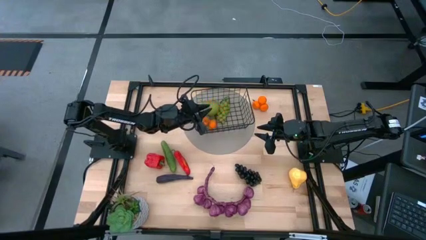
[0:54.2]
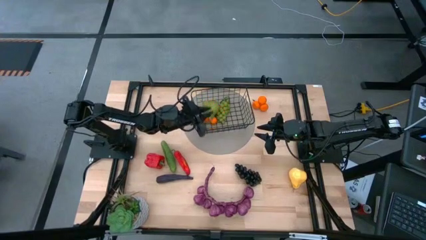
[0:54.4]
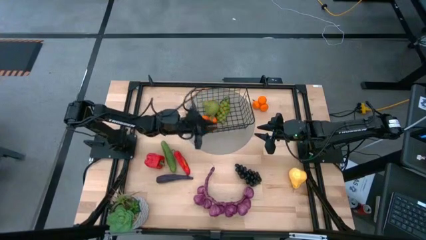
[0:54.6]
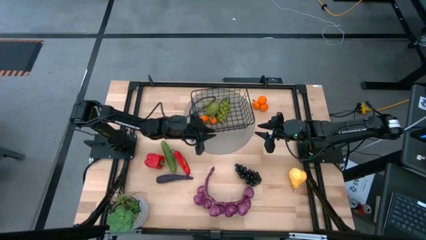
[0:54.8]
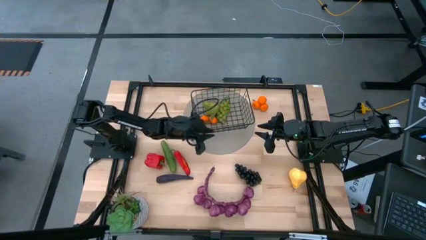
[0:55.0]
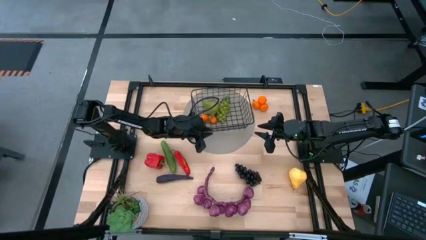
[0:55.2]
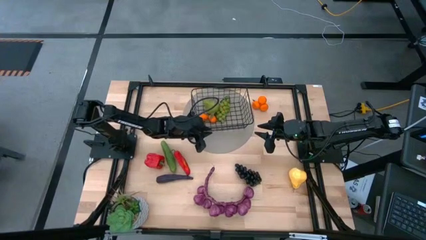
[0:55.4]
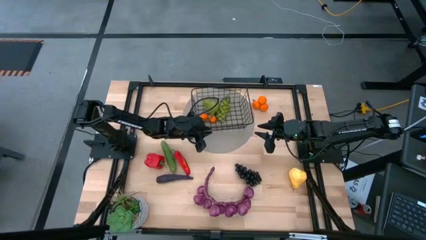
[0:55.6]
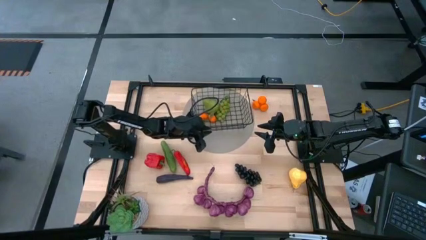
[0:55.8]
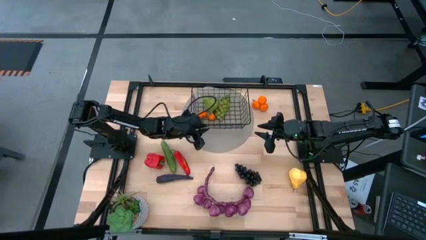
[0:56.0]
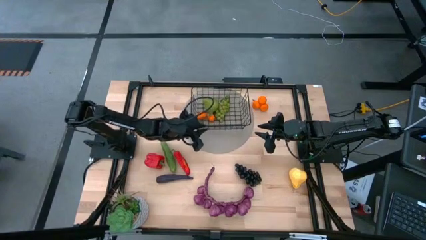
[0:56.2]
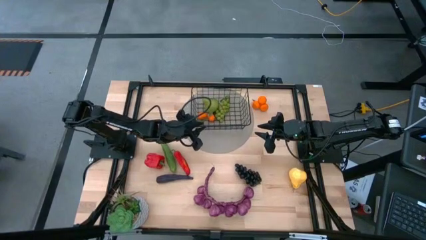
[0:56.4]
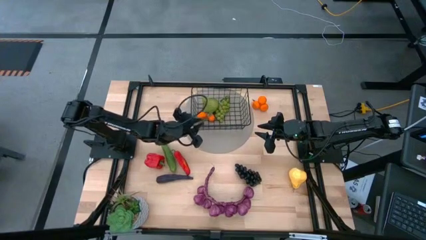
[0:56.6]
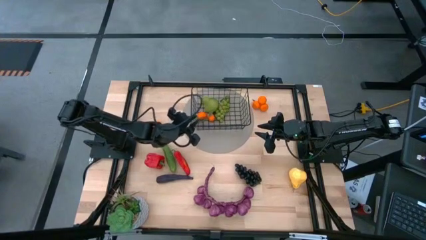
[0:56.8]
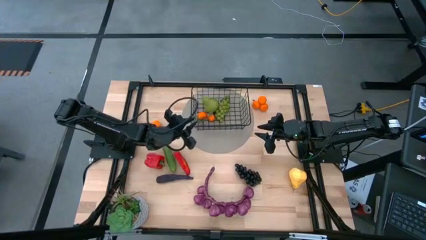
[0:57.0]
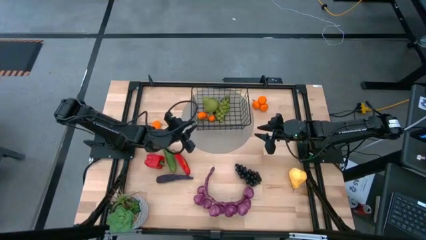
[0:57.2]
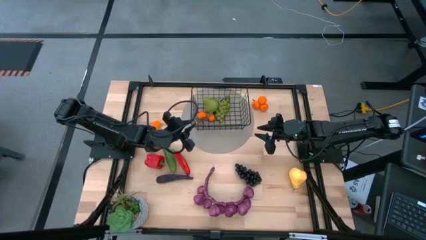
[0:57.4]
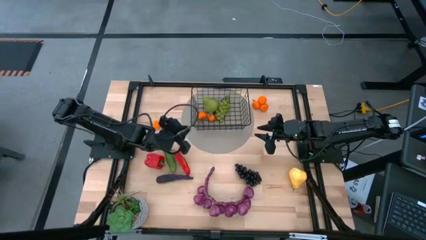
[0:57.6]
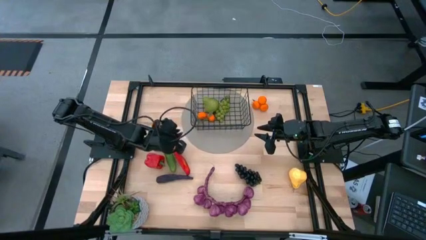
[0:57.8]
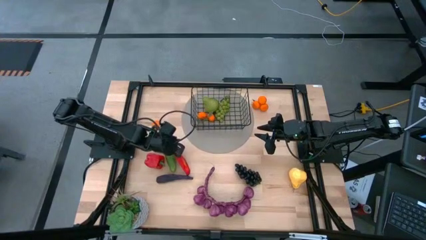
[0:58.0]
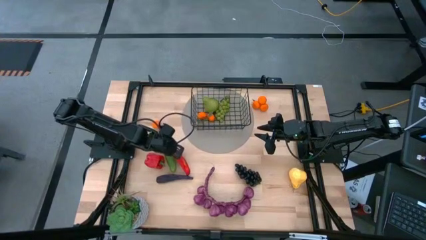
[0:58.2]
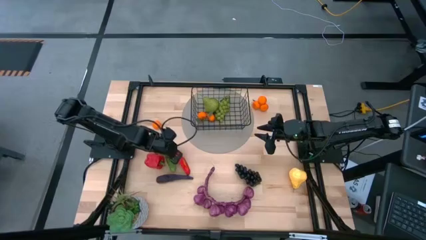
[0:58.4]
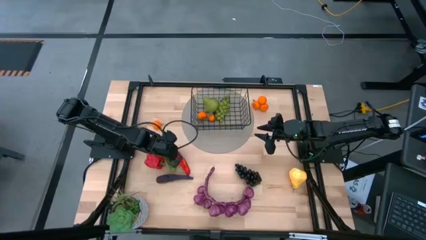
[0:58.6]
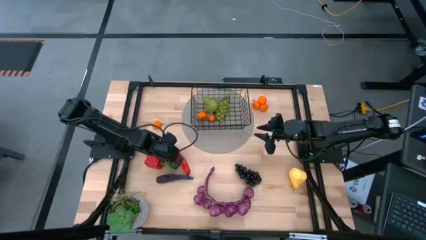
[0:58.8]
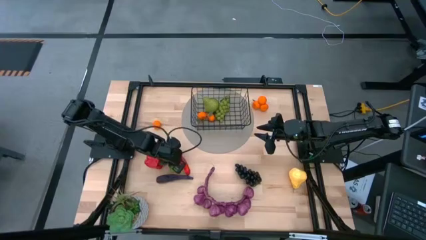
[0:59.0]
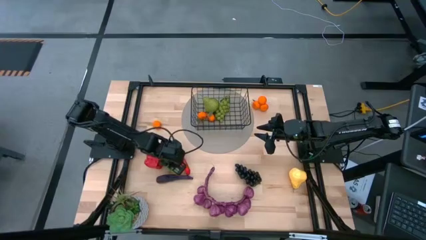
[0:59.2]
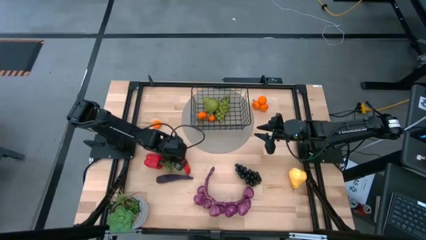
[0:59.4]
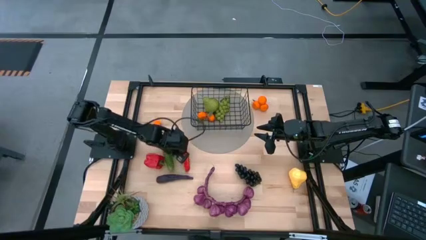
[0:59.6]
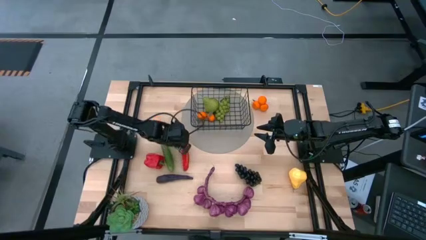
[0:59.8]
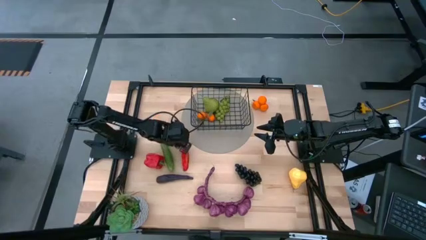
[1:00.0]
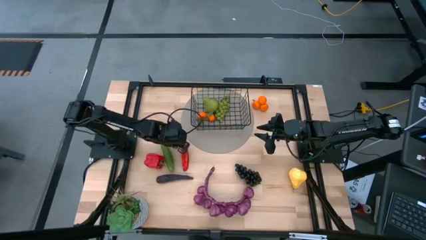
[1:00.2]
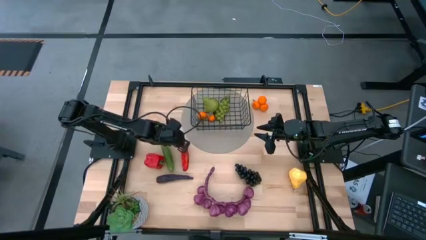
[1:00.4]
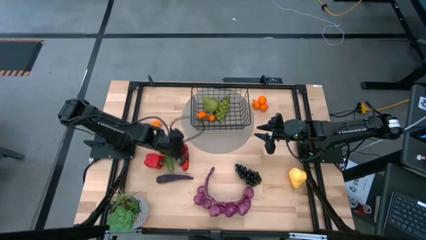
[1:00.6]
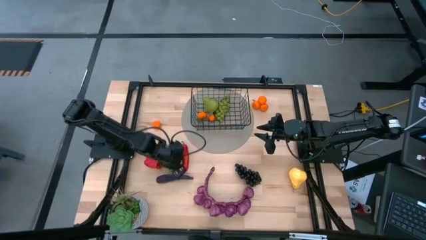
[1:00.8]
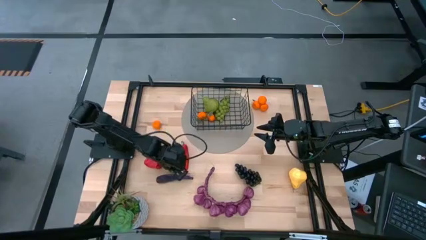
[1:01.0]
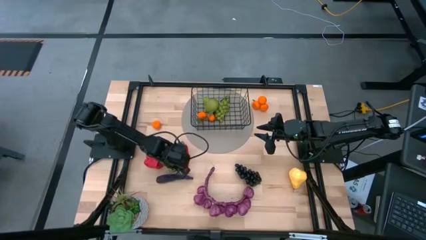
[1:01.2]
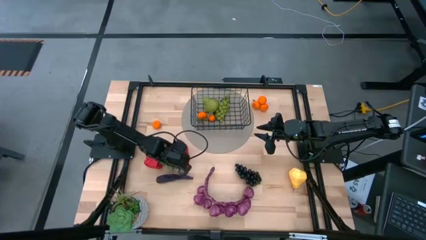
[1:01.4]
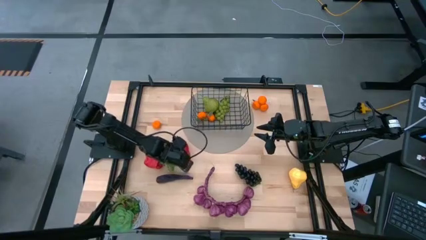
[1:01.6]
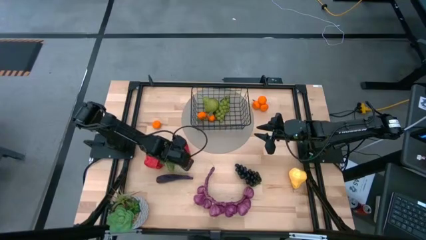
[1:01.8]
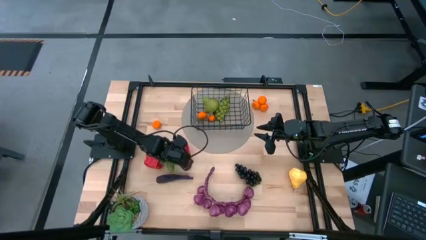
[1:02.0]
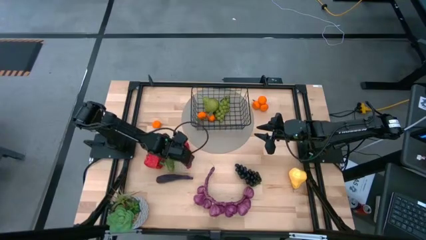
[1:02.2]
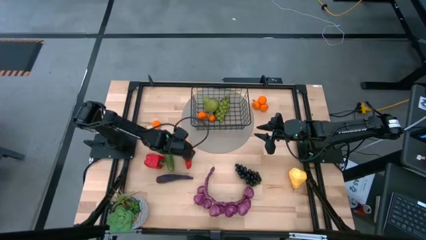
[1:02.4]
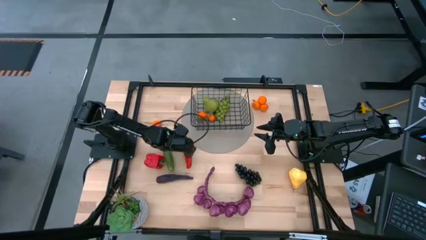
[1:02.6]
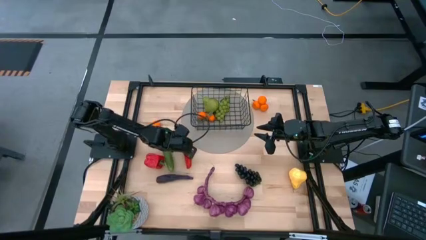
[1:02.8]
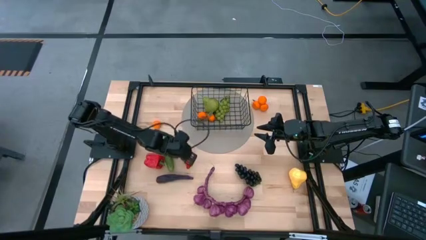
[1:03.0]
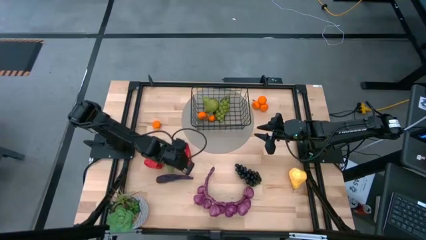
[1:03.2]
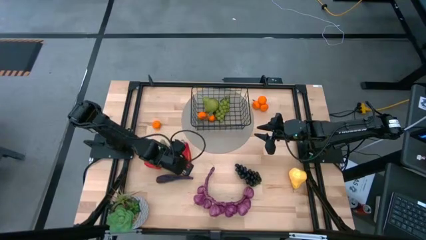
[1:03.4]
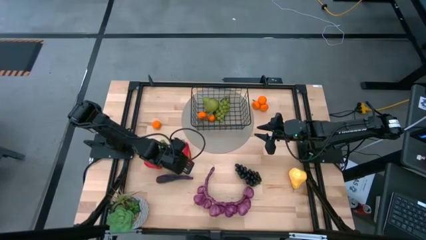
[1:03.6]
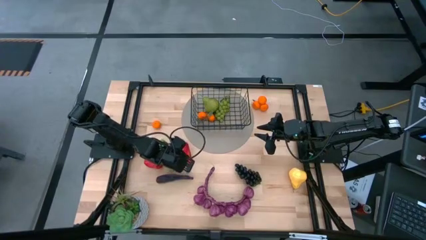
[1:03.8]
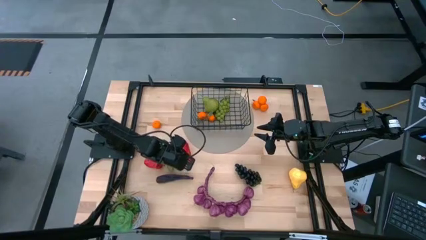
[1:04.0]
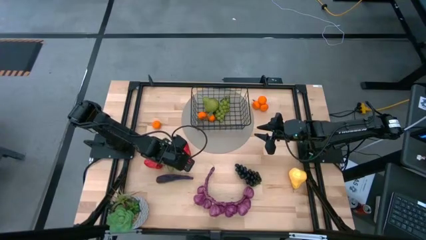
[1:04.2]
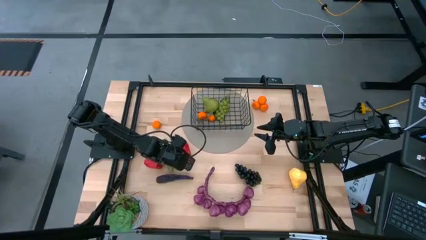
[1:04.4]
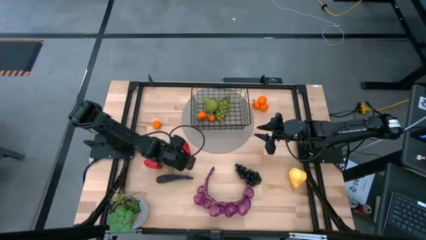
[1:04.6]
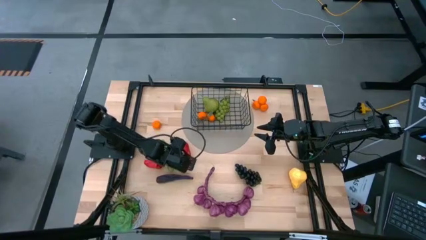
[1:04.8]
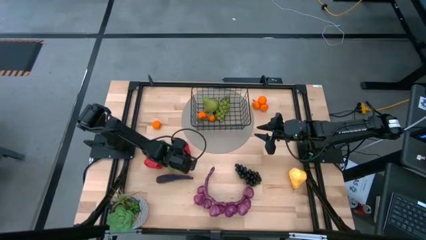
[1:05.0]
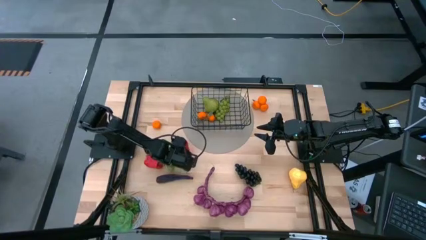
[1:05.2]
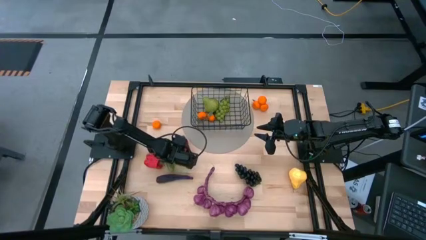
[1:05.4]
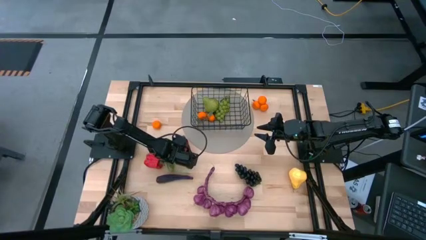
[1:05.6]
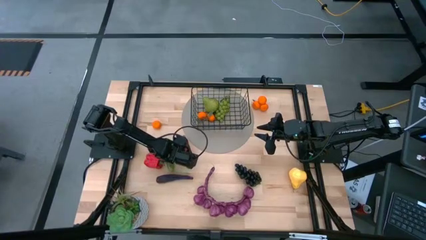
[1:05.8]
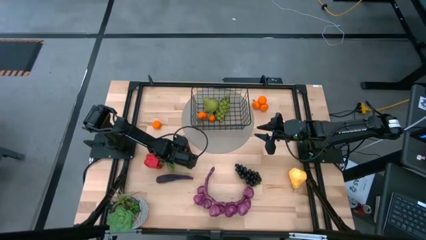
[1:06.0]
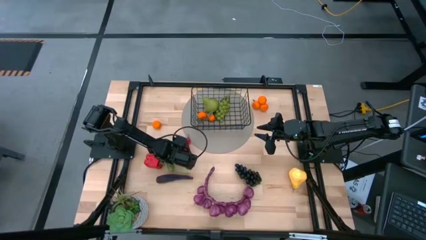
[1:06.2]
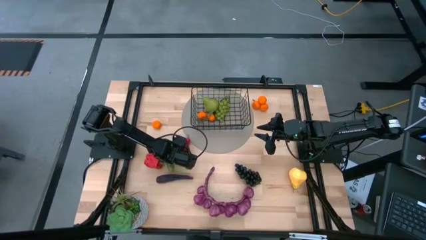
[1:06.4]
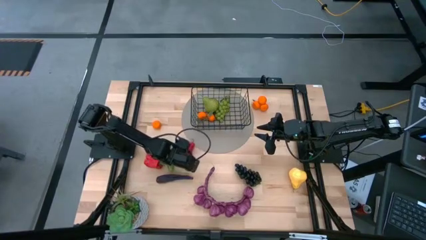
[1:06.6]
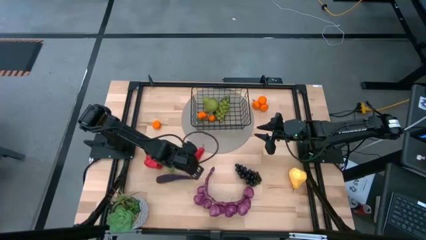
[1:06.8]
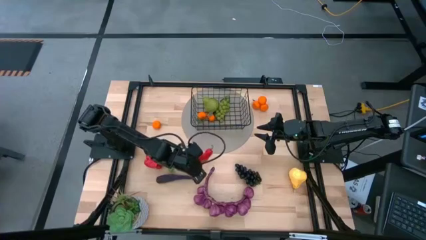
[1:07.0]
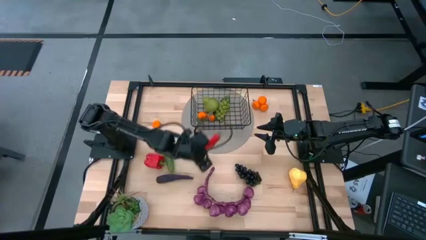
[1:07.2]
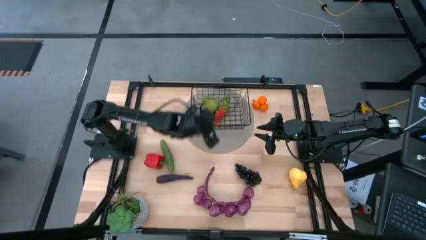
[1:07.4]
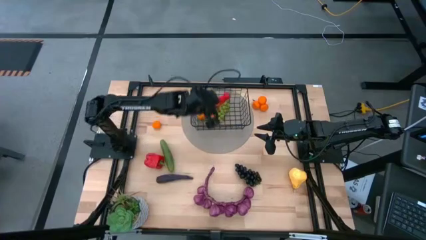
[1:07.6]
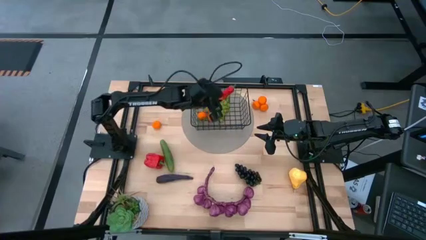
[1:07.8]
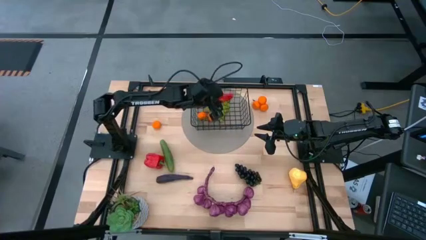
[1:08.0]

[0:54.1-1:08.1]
Task: Build produce basket
Put the red chili pepper into the black wire basket

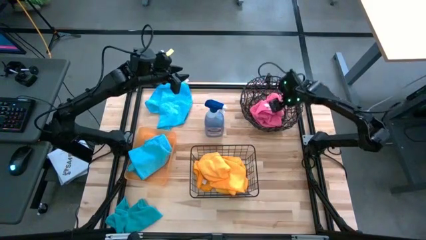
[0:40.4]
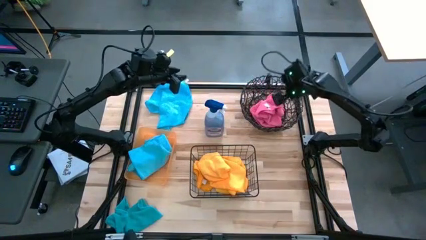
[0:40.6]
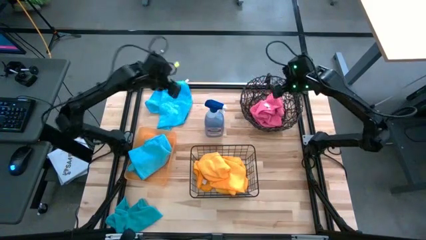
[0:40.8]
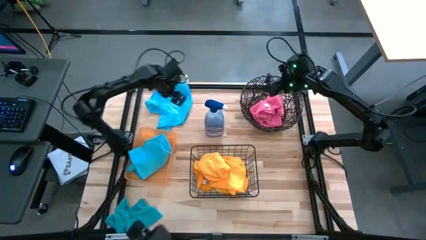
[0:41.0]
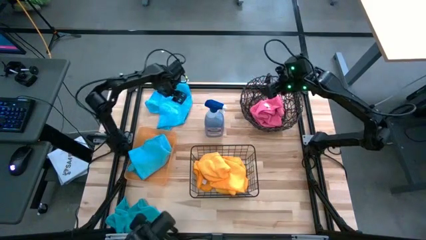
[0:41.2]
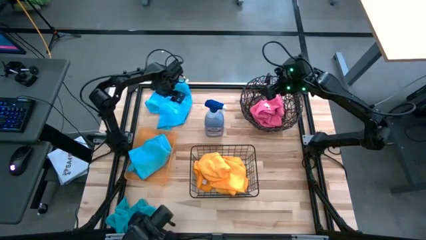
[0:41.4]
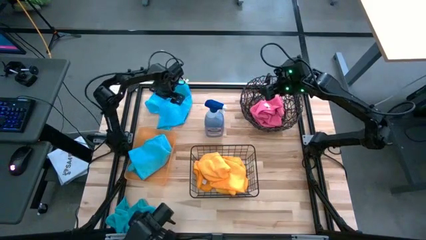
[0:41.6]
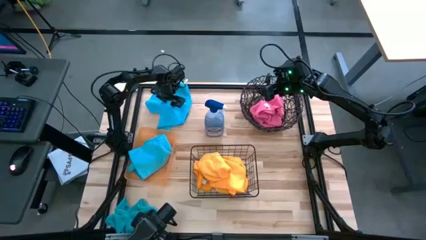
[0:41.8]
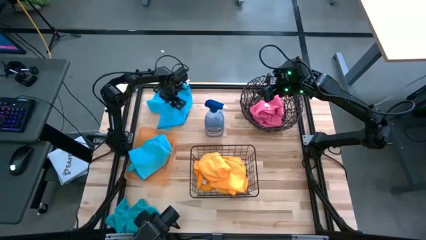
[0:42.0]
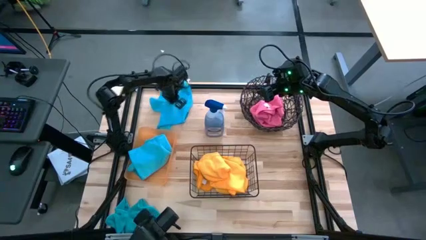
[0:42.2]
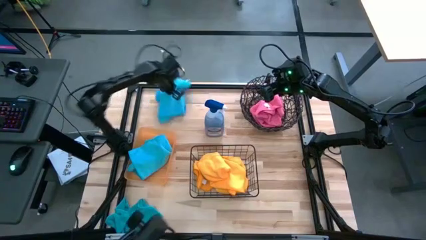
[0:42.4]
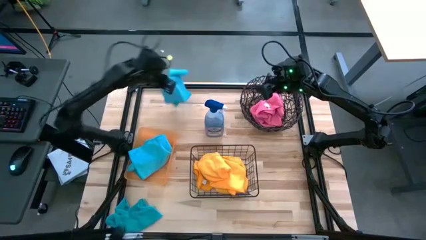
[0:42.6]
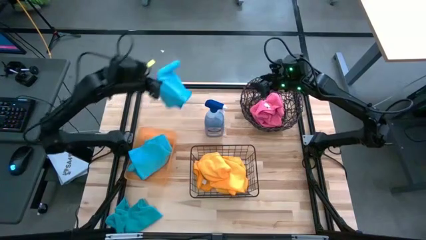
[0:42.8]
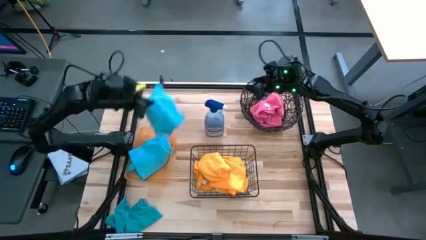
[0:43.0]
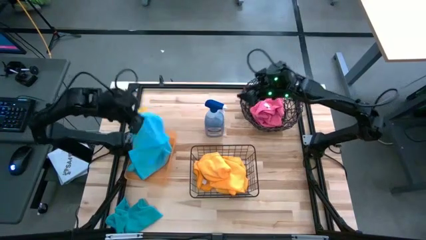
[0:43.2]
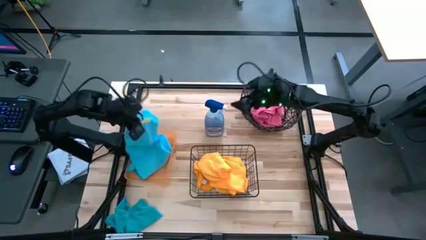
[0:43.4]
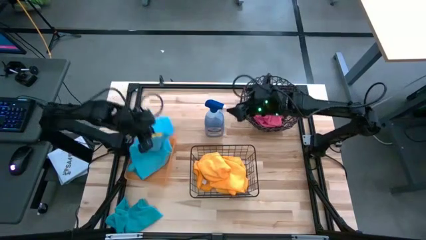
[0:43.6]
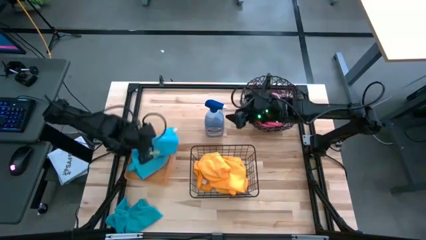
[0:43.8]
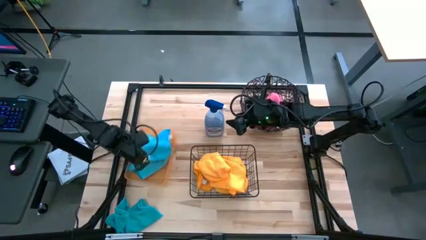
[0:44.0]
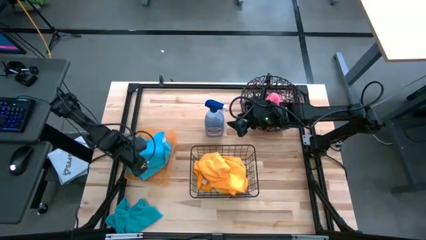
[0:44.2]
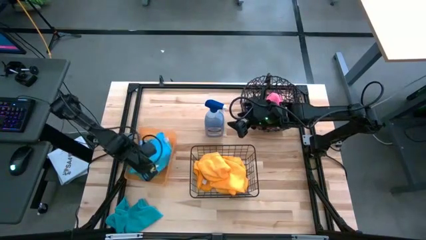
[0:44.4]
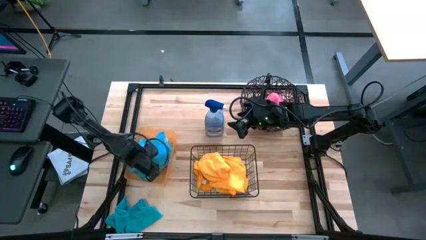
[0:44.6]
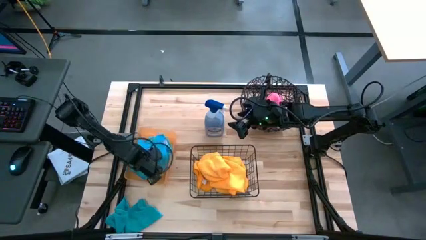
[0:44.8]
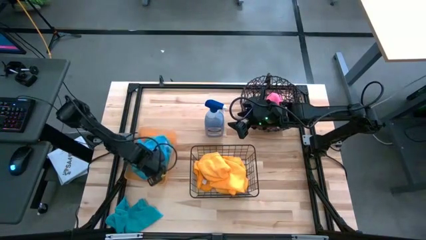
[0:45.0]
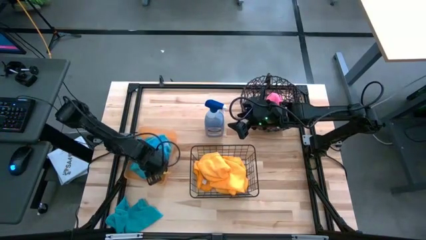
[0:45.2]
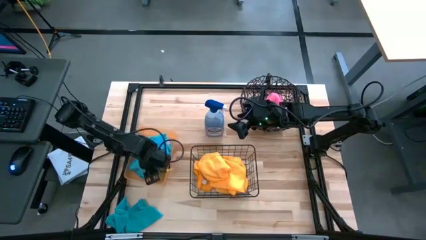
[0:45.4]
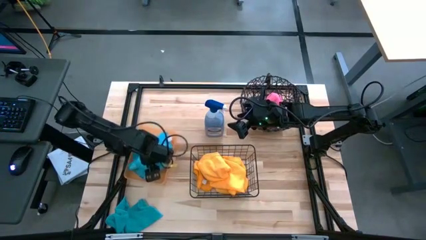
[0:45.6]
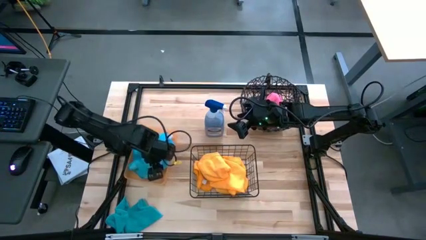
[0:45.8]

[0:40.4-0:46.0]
Task: Sort microfiber towel by color & place in baskets
Put the top blue microfiber towel into the orange bin
